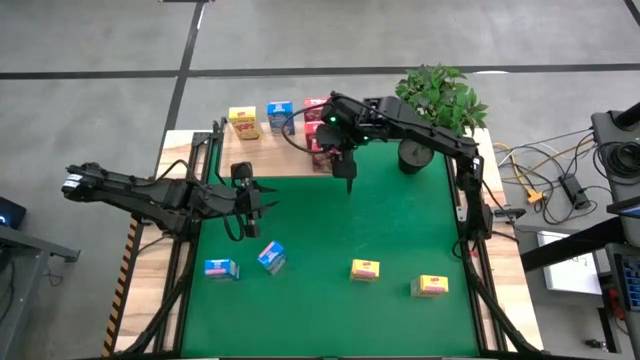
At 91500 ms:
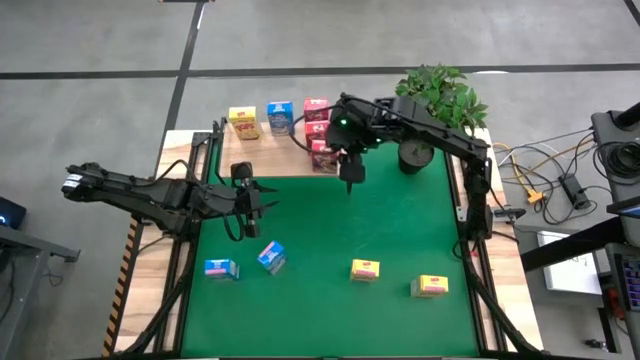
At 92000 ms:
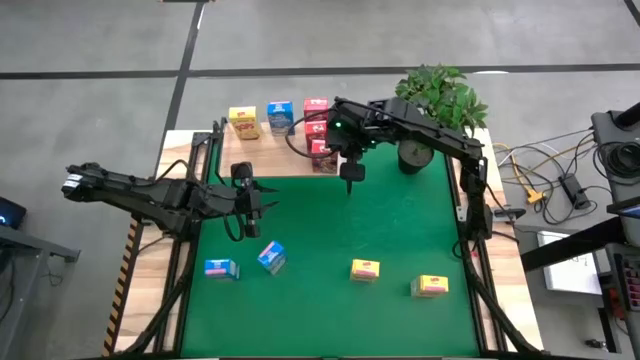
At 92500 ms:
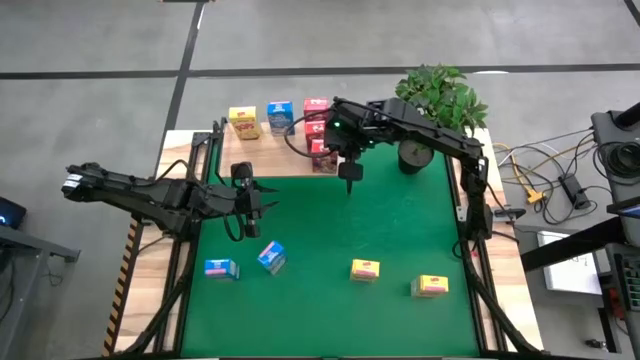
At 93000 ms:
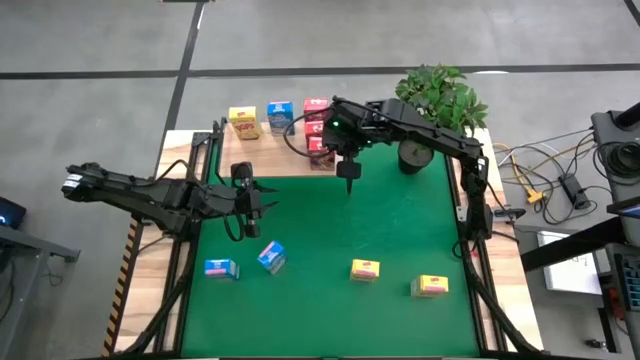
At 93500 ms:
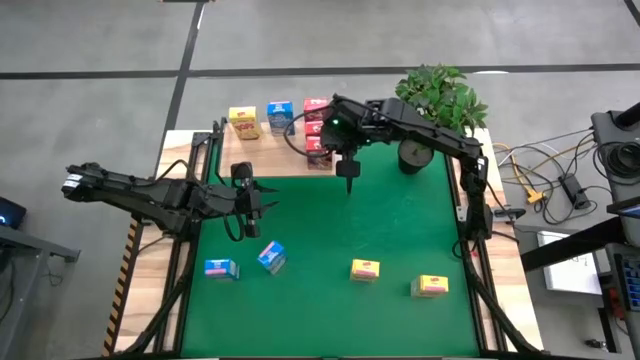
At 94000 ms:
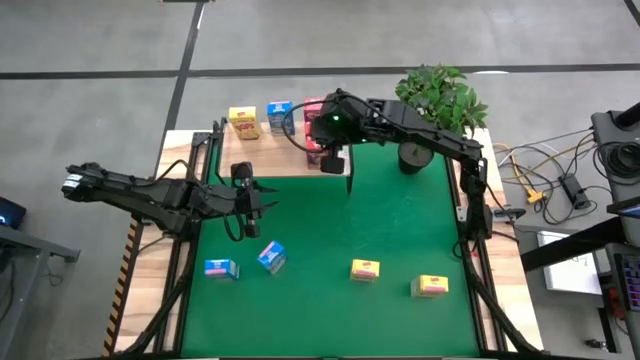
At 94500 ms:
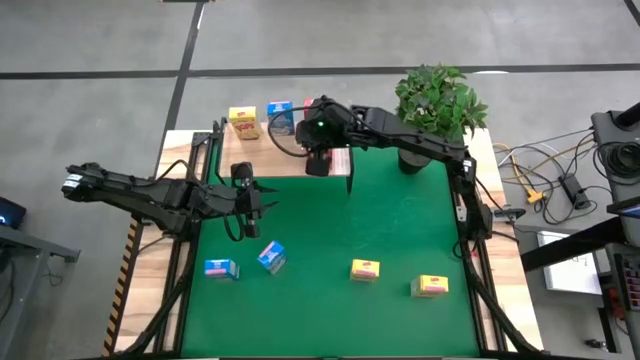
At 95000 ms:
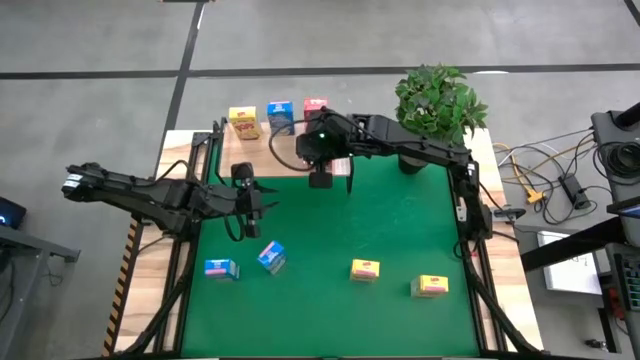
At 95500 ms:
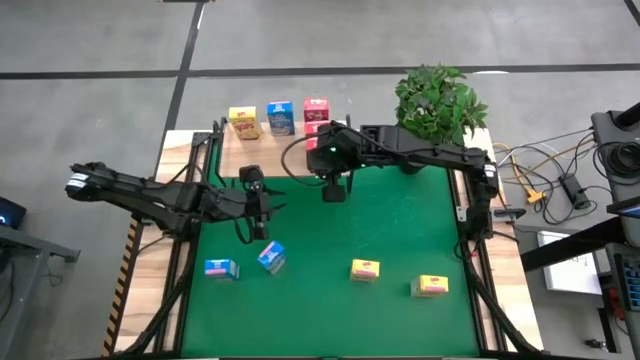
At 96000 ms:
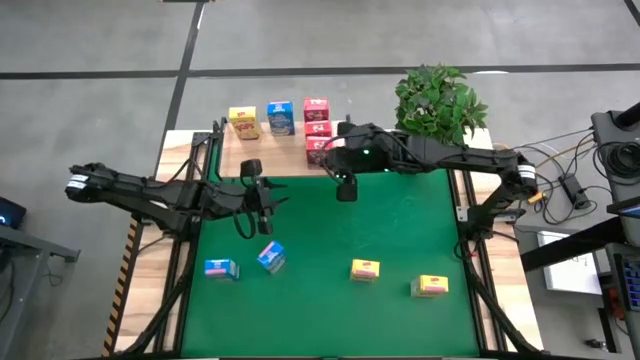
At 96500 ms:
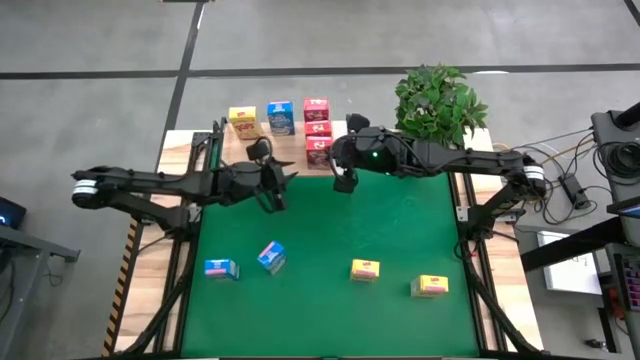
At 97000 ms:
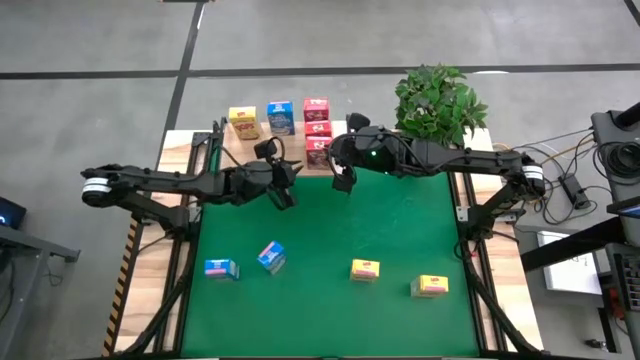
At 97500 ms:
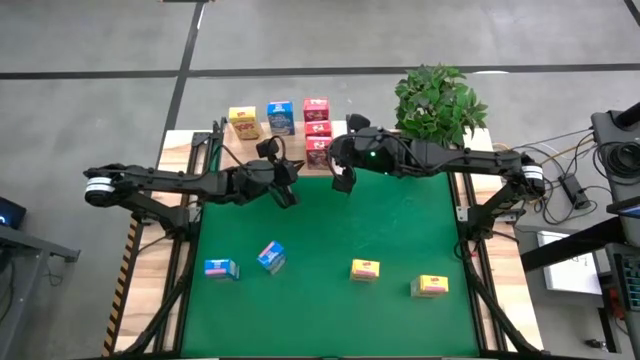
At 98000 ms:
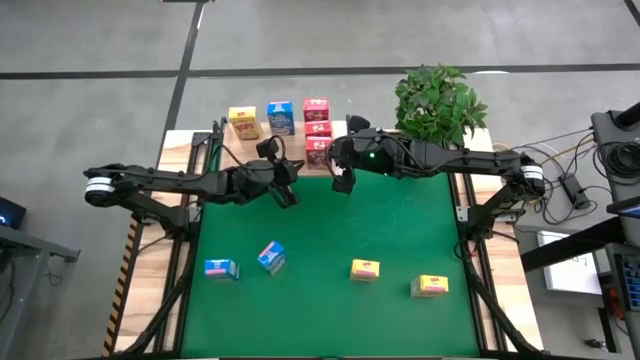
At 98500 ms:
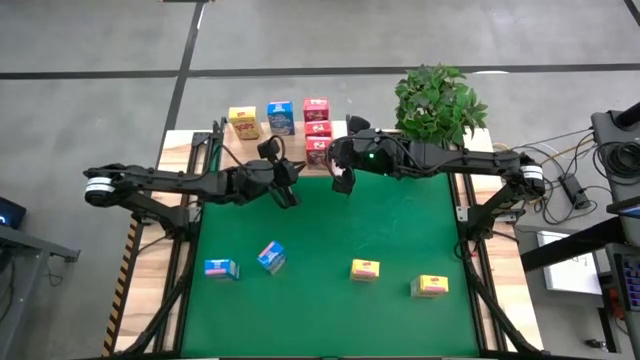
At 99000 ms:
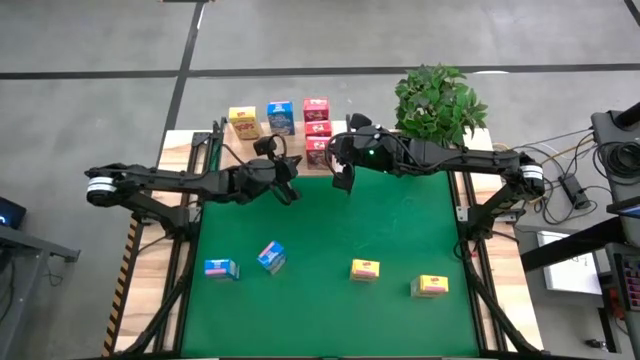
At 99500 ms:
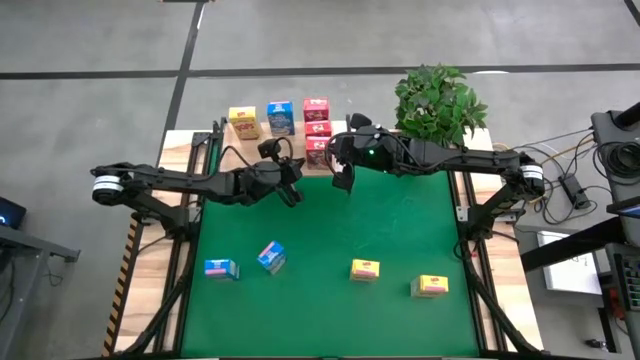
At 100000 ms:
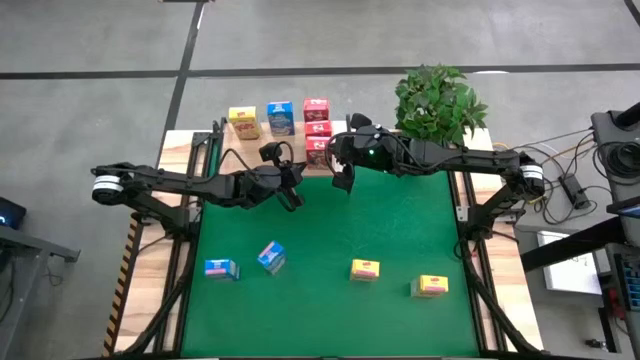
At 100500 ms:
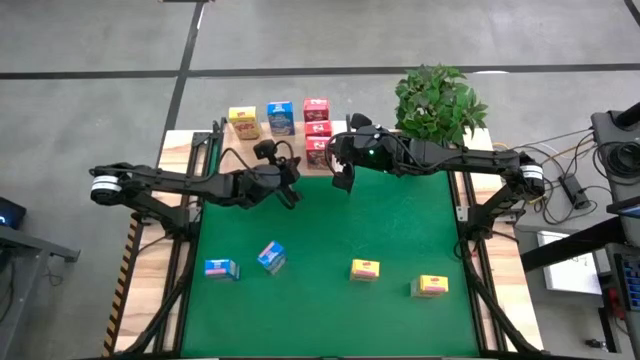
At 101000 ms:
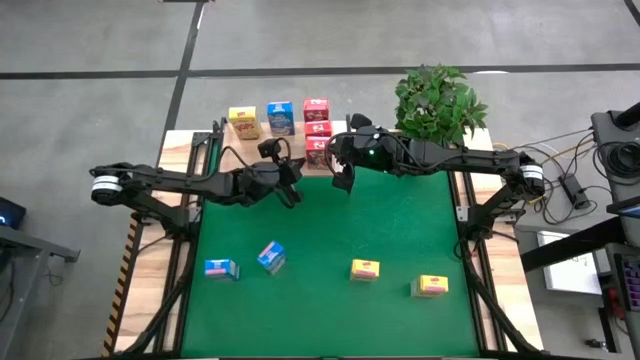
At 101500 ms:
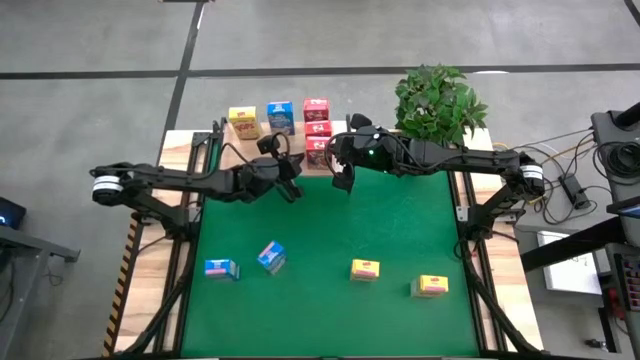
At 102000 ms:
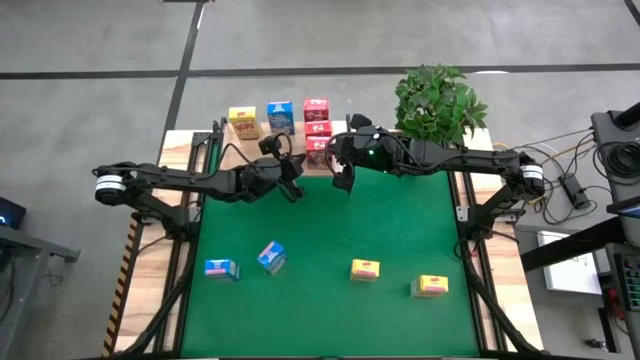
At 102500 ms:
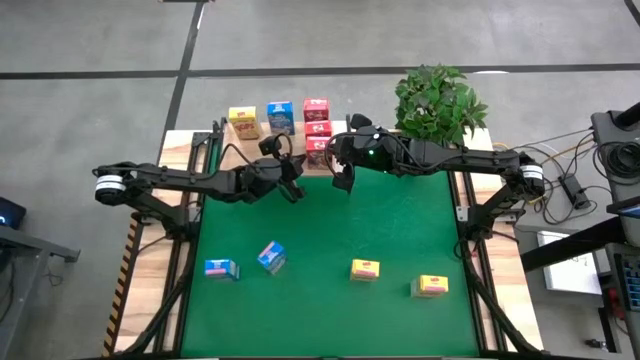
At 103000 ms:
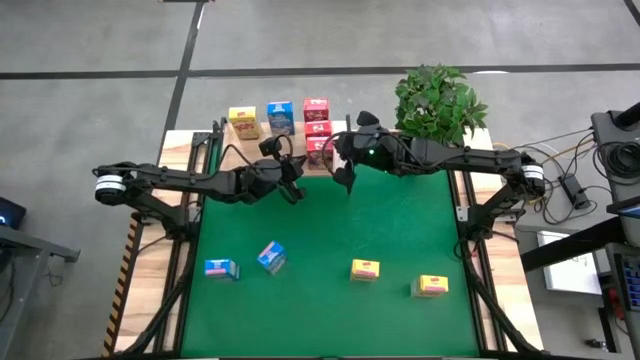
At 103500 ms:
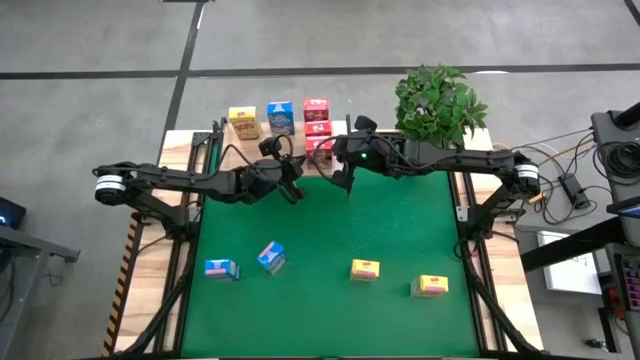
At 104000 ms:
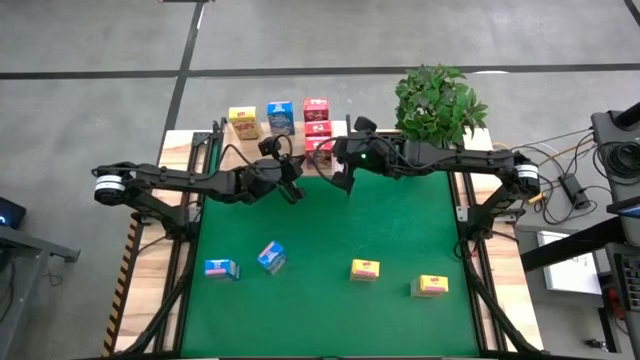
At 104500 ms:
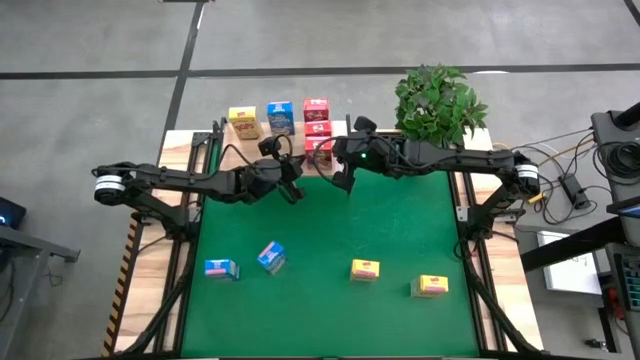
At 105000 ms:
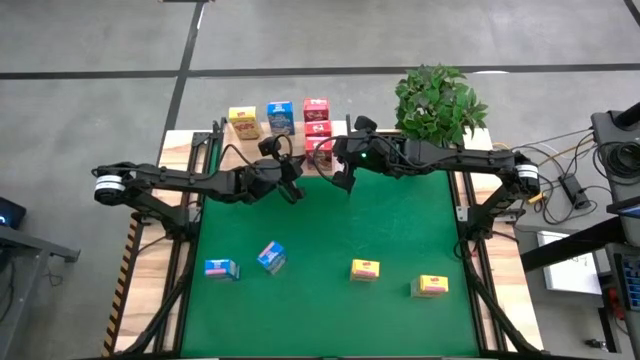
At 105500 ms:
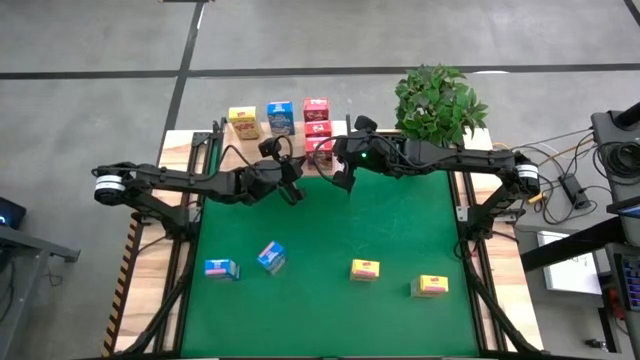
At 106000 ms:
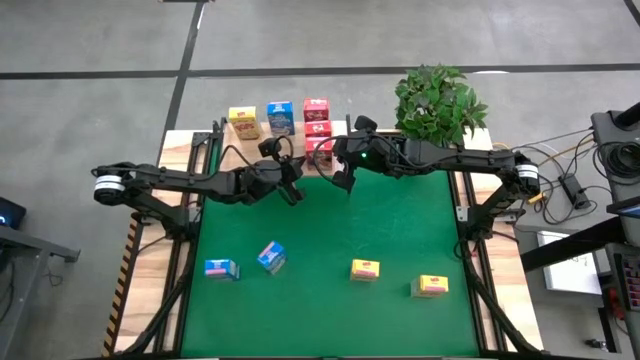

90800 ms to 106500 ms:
Task: Stack cereal on shelf
Adjust the red cereal on the shelf

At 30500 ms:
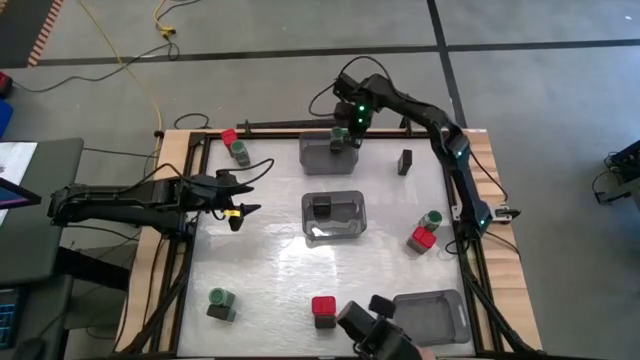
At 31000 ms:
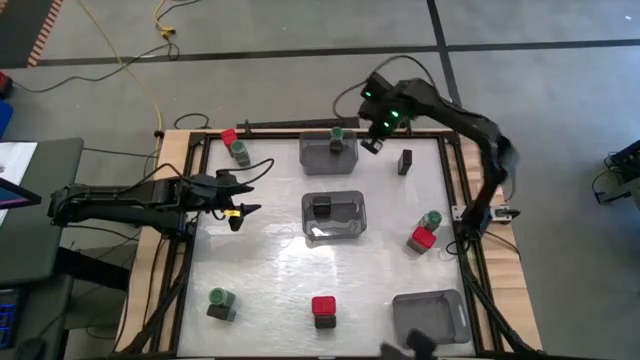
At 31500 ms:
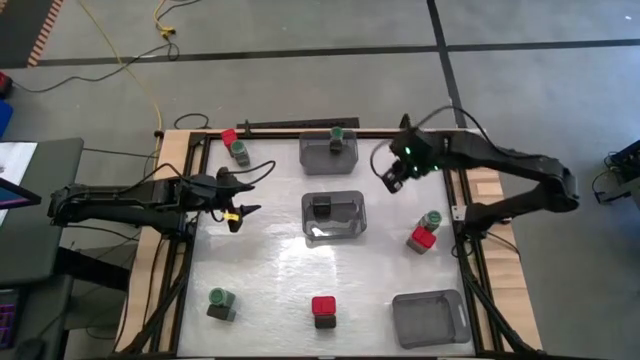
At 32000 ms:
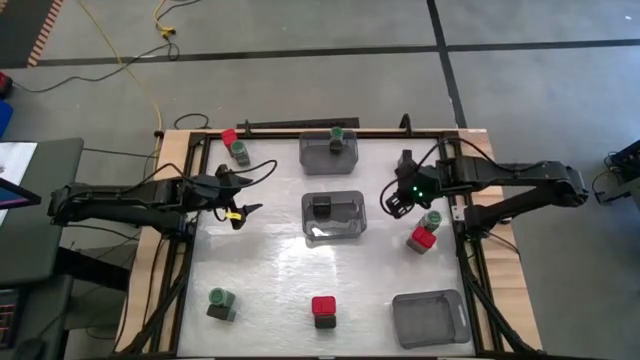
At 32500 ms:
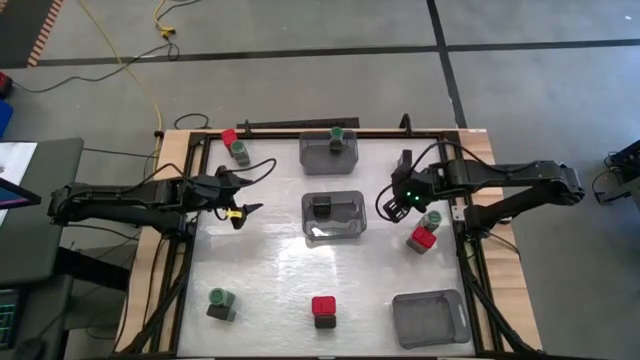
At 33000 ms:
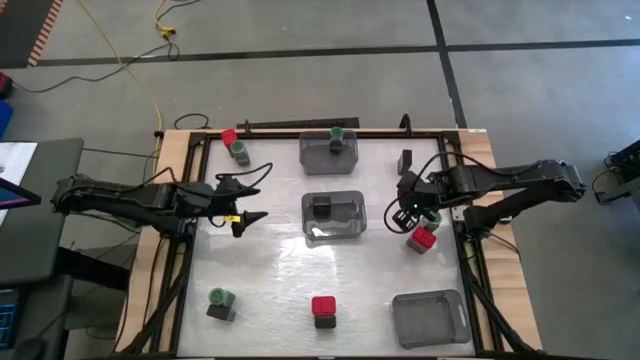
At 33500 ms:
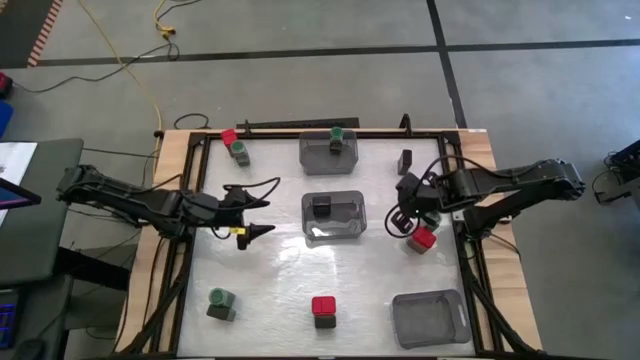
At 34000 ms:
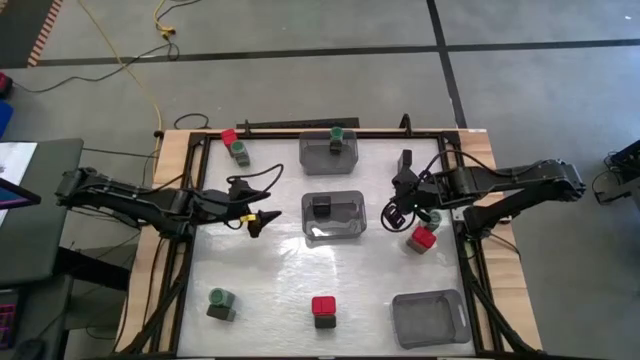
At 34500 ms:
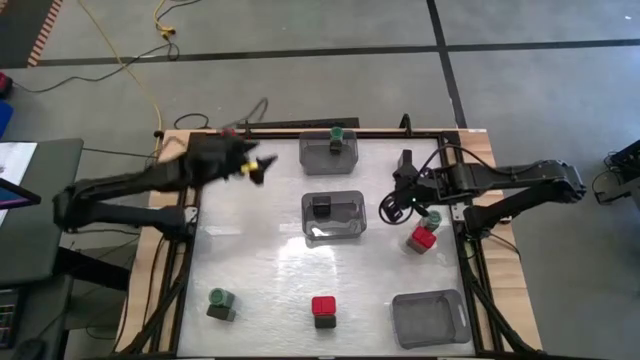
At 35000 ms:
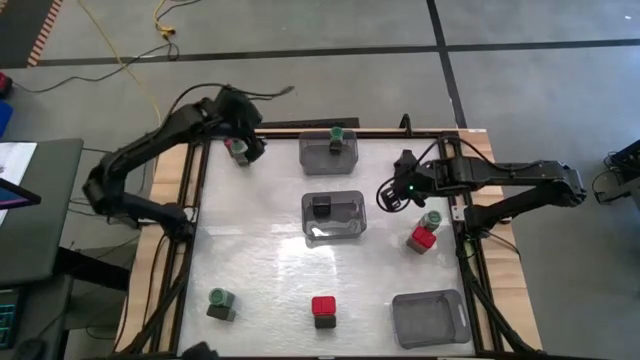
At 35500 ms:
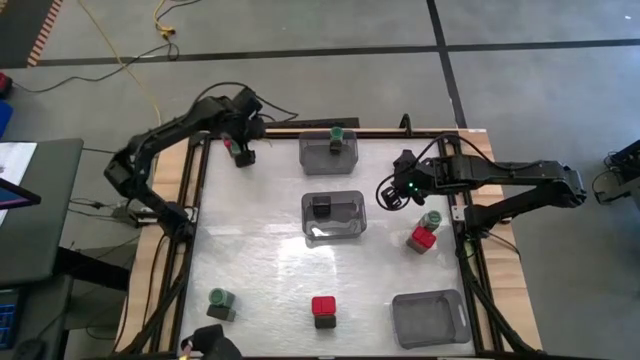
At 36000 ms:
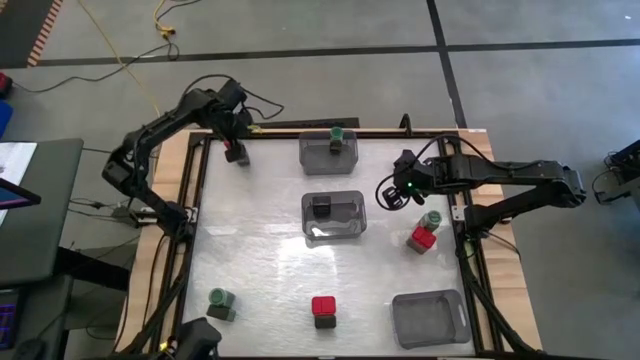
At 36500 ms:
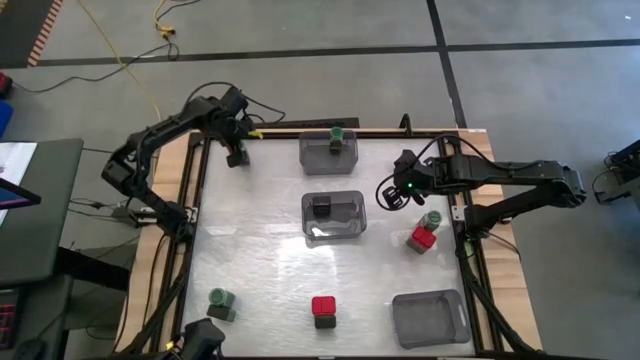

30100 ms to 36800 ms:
Task: Sort spices by type
Put the green seasoning bottle into the top black bin
